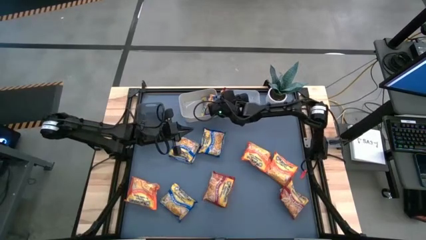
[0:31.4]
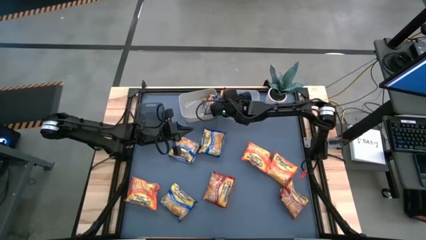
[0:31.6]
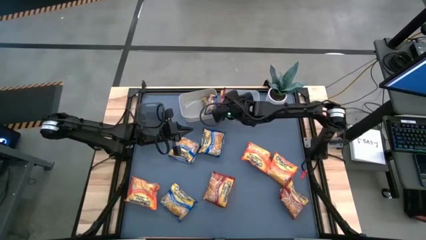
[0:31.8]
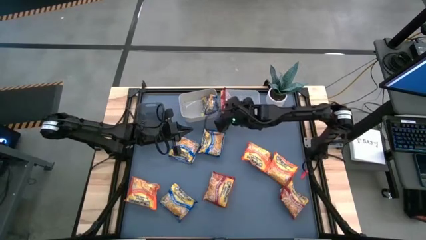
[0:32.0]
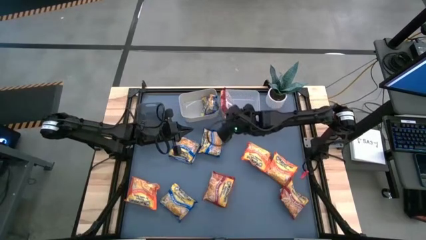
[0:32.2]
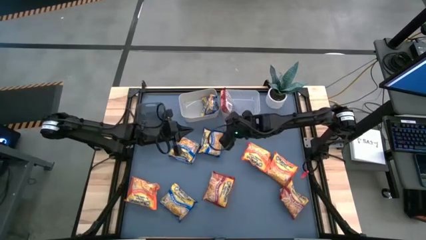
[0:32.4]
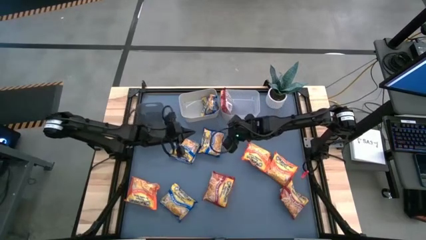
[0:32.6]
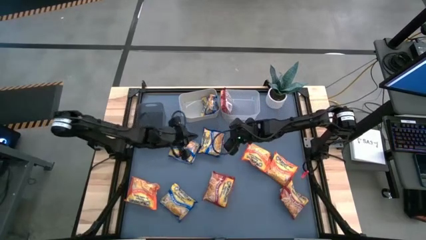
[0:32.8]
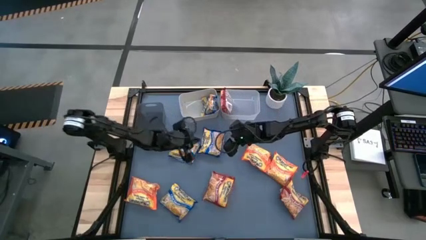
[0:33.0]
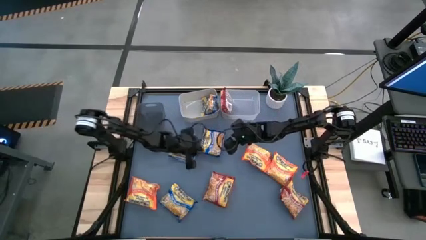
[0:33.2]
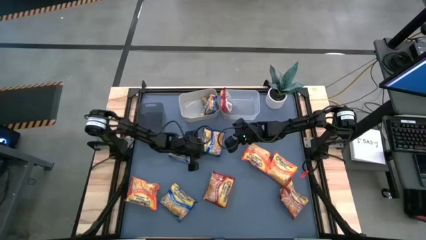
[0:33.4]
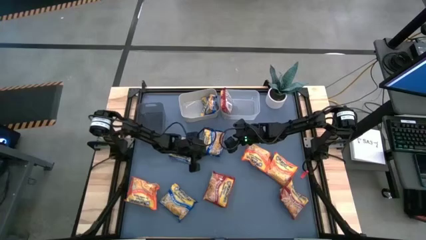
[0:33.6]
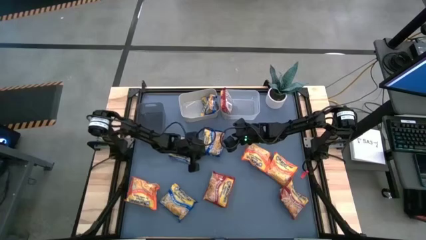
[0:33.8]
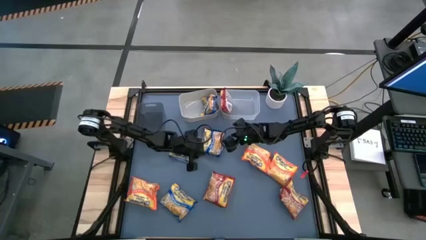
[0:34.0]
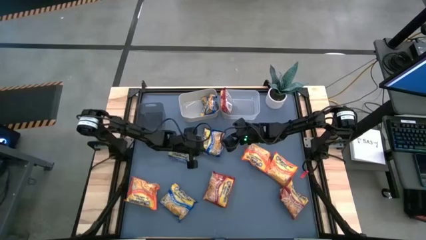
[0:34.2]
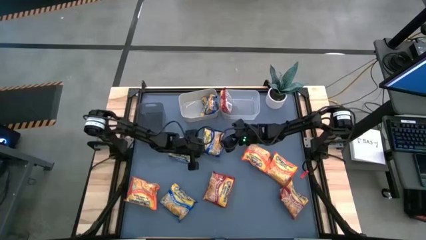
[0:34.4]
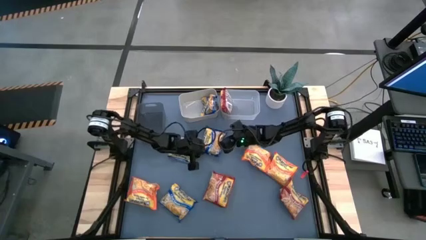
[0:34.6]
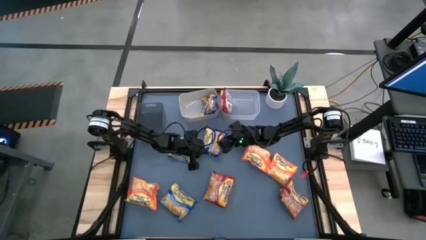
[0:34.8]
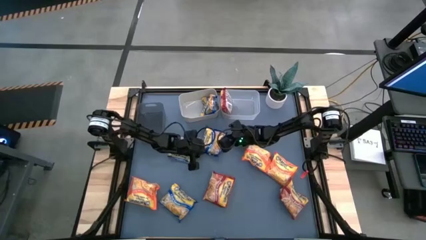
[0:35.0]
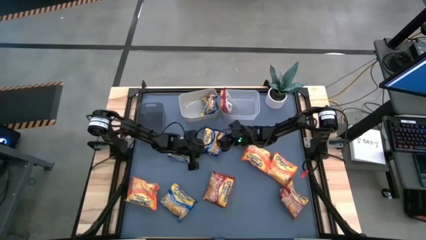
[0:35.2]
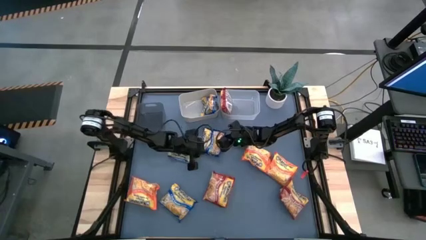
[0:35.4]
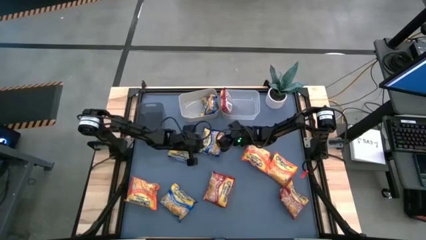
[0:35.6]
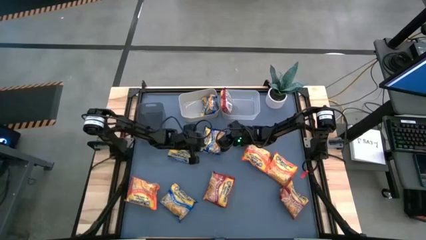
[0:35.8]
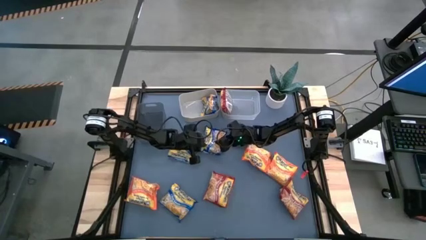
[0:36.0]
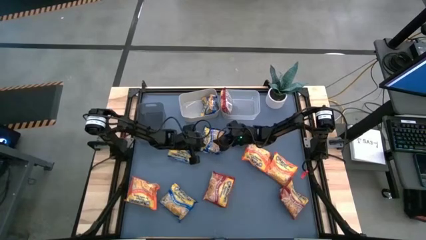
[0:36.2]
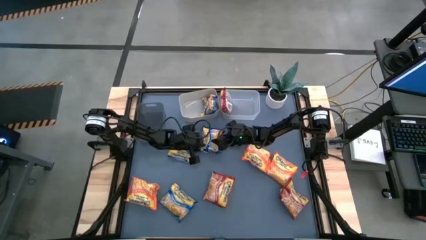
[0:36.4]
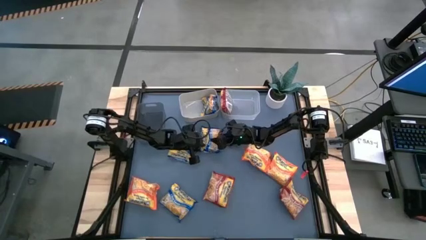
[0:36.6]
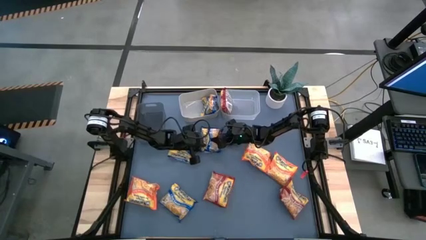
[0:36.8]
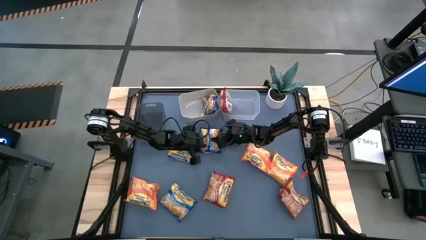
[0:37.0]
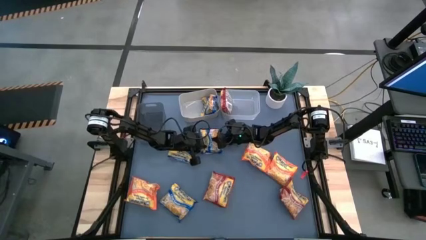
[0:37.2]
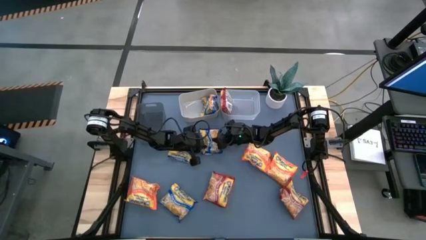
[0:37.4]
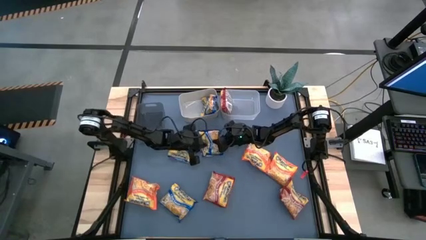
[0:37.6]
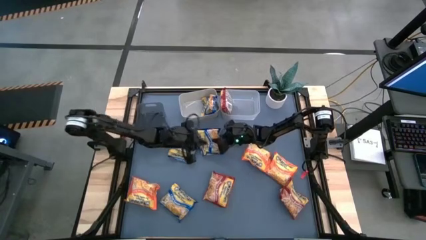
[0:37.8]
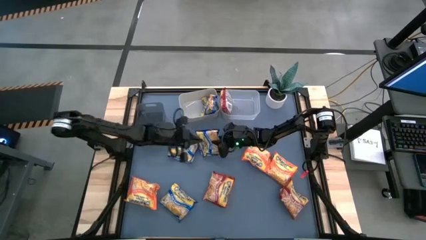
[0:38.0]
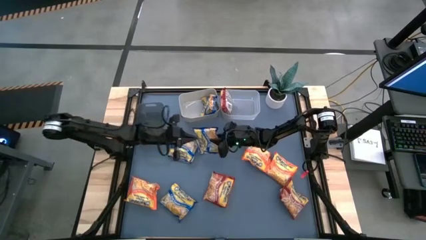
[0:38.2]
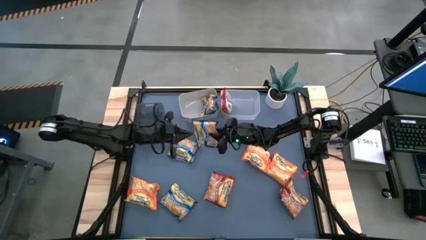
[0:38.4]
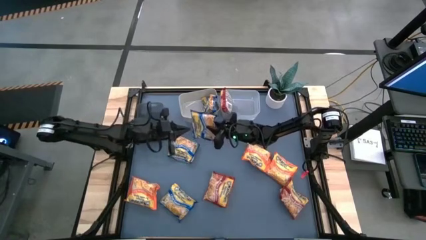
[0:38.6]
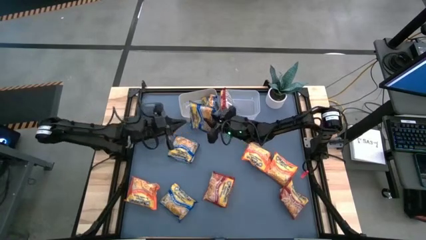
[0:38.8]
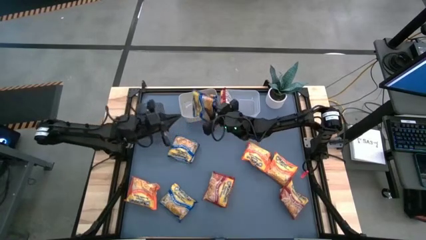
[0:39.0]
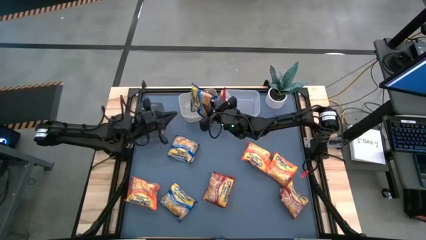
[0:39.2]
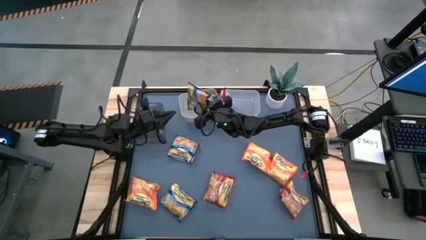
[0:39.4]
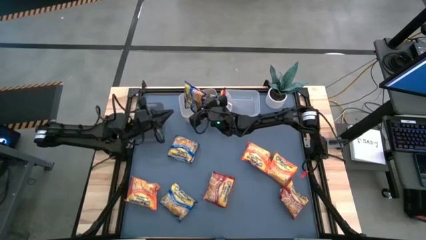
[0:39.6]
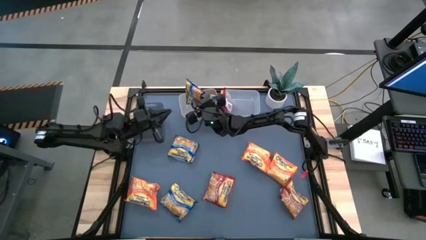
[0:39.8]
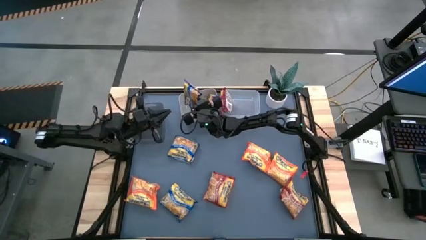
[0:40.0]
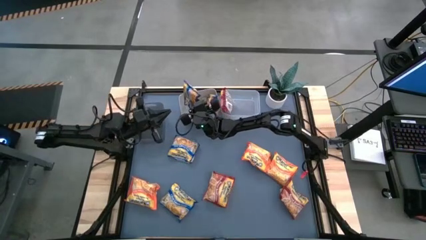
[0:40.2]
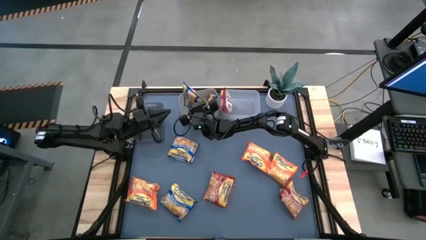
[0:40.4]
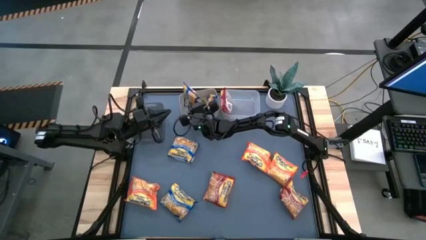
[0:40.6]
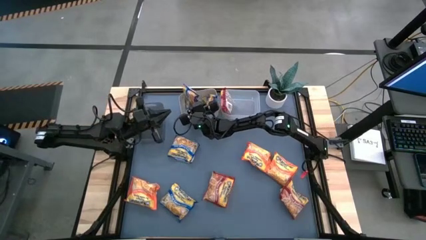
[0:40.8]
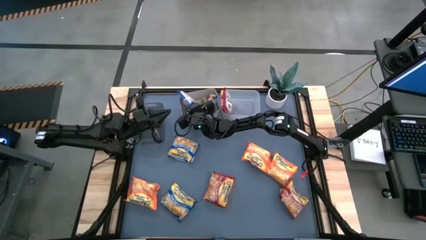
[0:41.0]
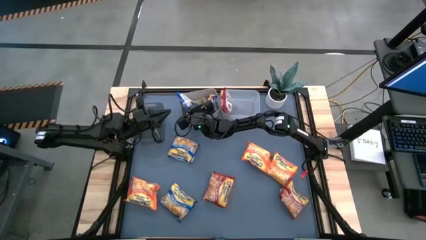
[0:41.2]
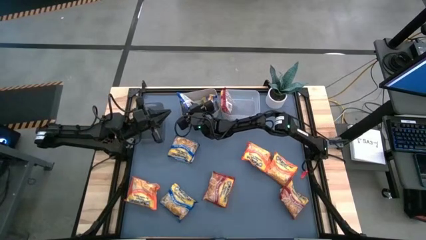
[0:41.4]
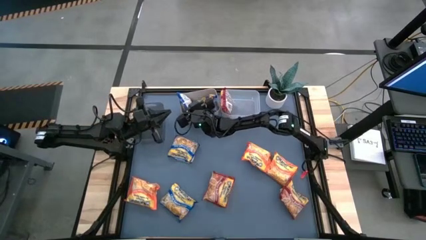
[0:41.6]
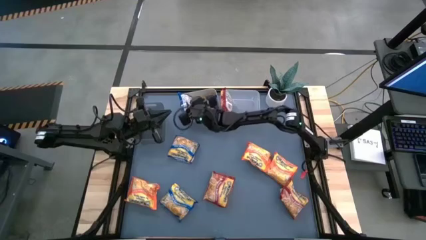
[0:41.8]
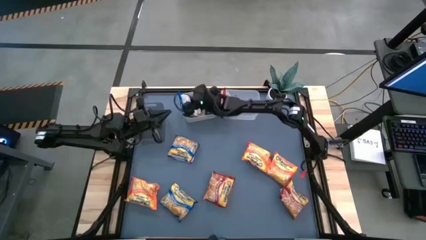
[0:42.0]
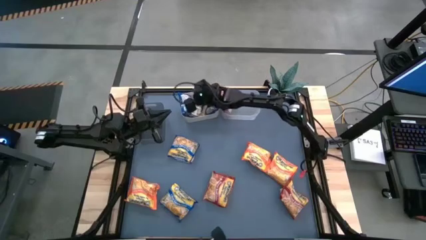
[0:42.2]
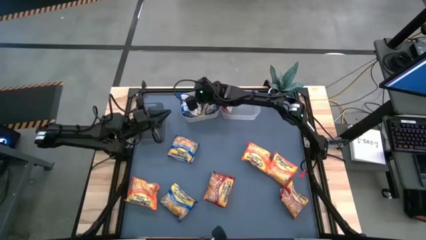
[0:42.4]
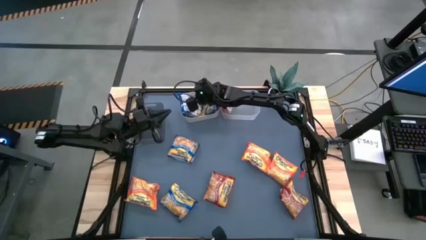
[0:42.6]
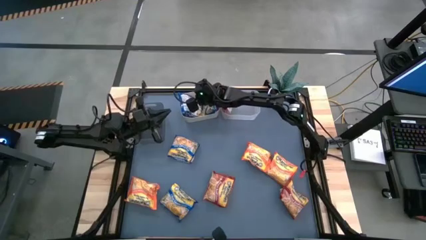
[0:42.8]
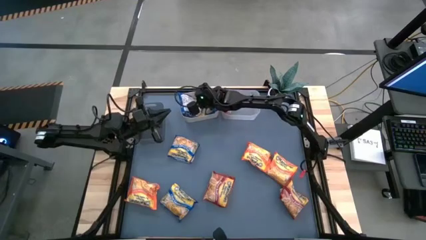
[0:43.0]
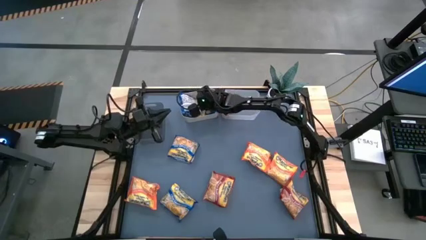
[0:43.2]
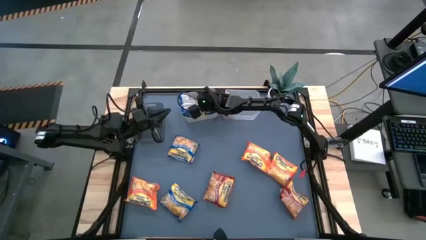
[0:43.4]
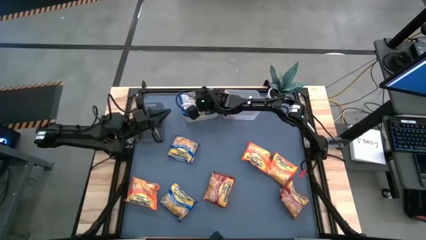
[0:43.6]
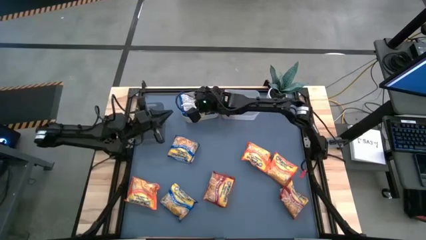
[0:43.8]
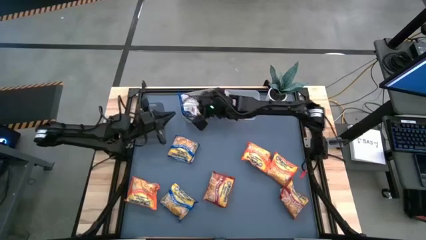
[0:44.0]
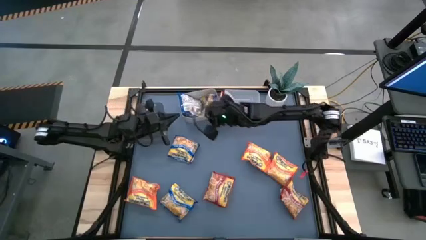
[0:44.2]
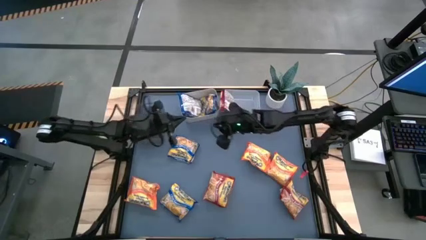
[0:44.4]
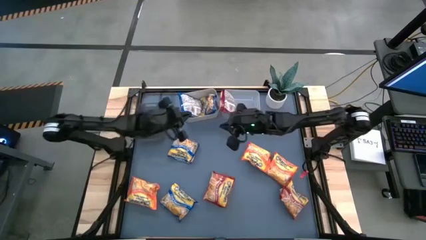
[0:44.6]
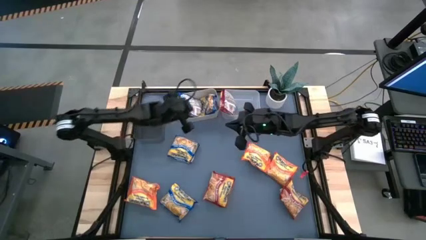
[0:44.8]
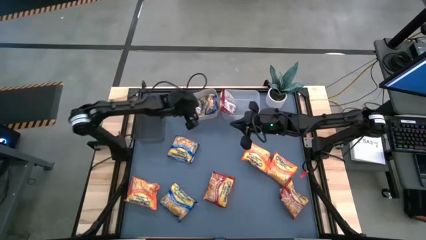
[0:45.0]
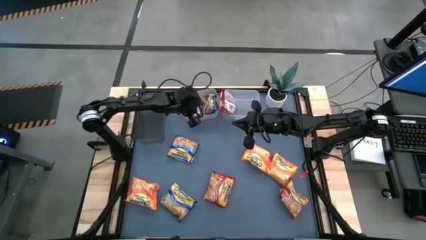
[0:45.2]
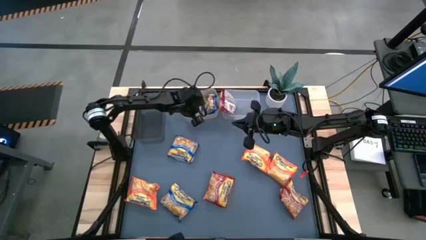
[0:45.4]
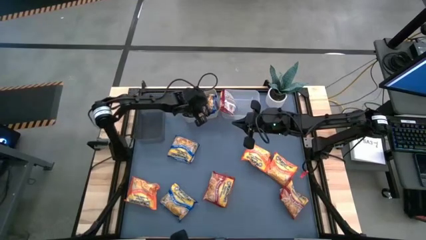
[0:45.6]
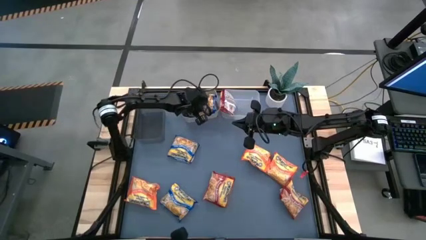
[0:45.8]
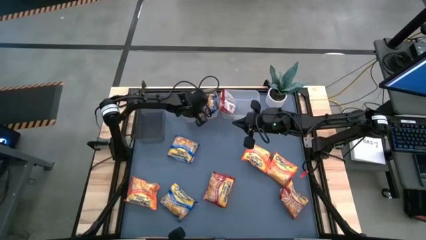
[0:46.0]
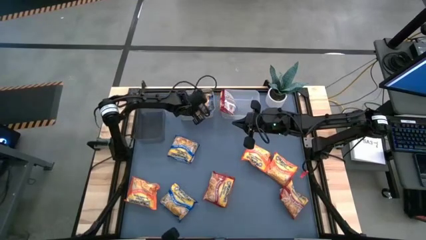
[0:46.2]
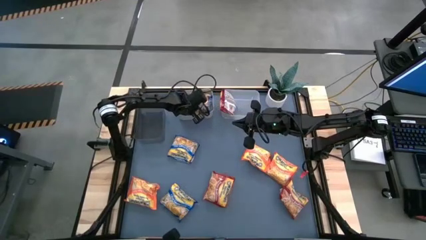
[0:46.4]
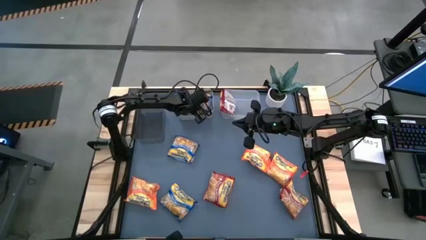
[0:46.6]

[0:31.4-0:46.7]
Task: Sort Maruchan noodles
Put the blue noodle pack into the gray bin

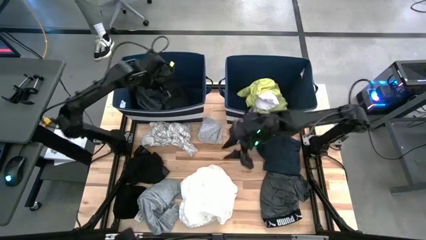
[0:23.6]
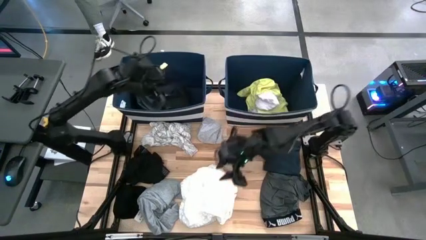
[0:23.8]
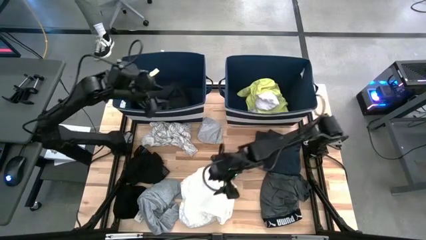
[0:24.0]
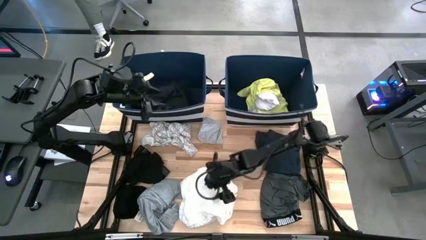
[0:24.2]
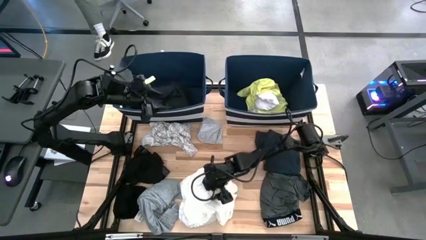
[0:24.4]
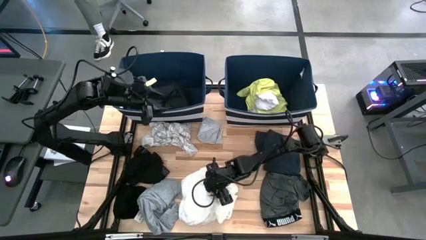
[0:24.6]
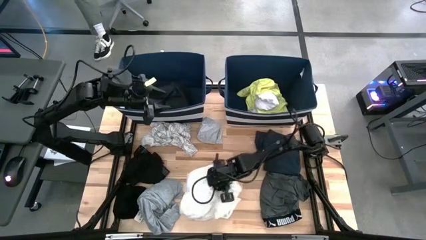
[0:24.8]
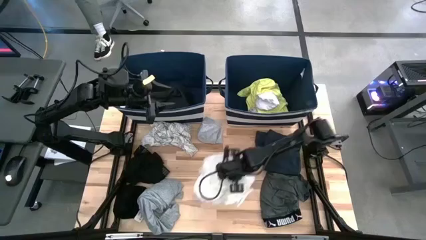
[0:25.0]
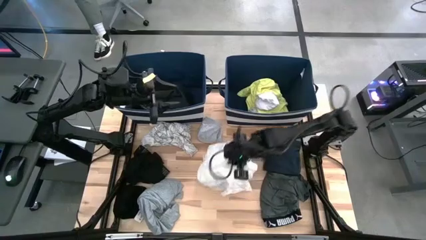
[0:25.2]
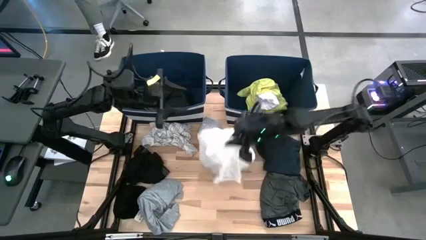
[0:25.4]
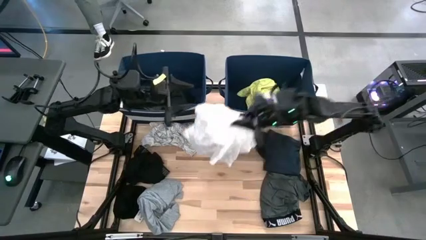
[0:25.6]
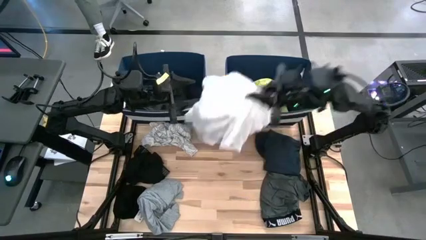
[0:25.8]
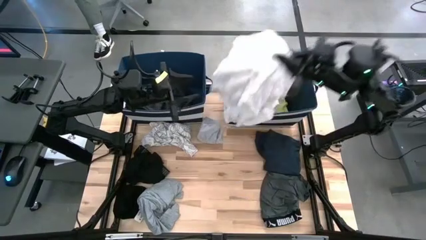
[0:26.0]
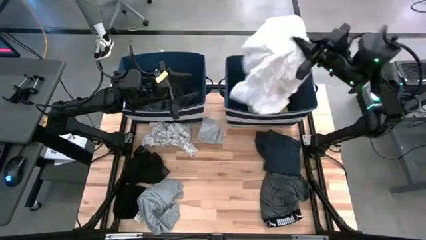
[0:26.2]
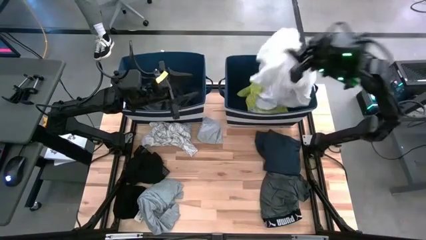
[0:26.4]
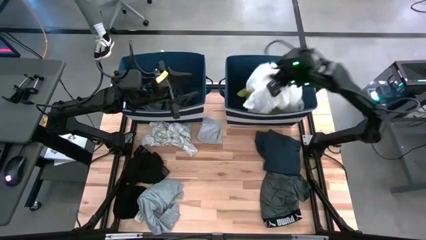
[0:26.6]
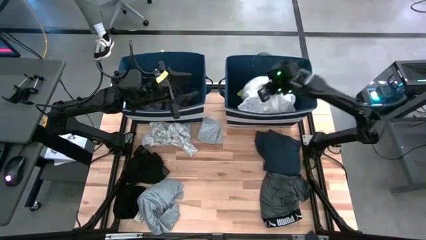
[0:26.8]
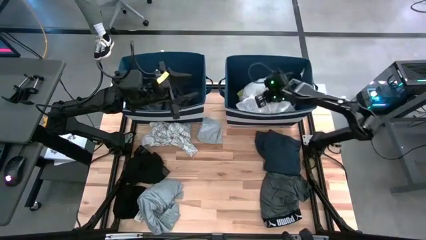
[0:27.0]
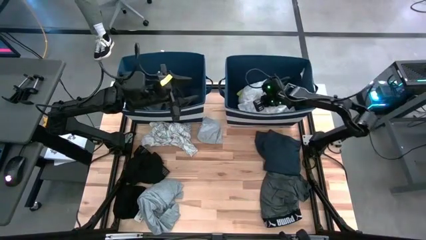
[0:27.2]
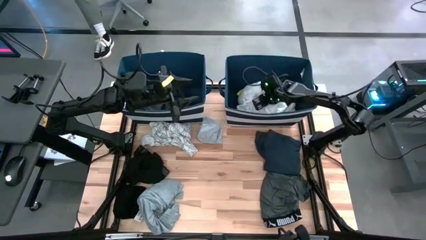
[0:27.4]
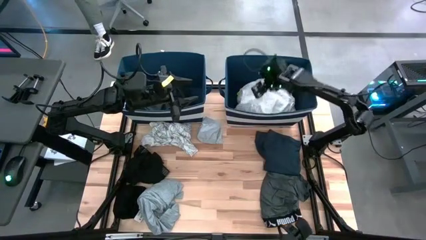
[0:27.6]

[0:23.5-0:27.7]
Task: Sort clothes
Put the white dress into the right blue laundry bin
